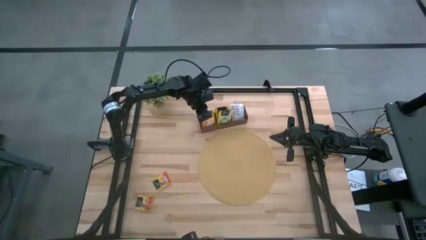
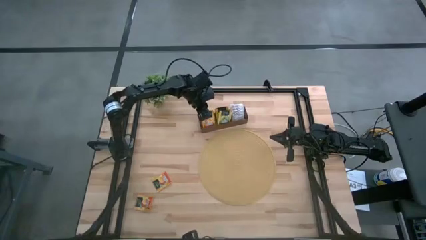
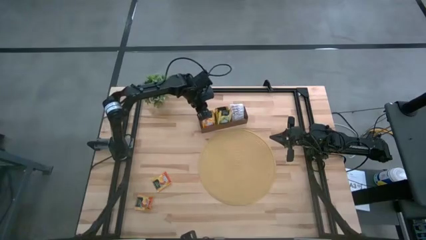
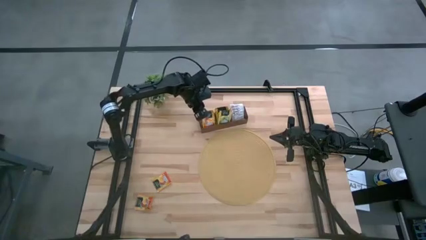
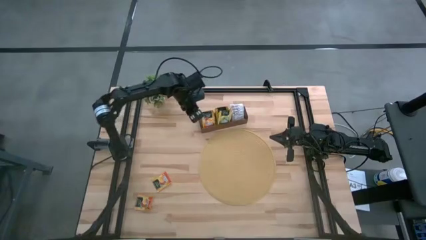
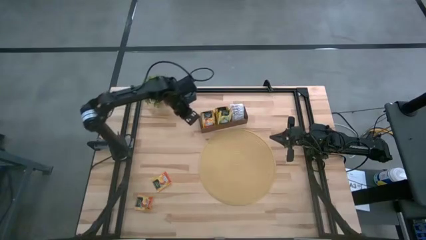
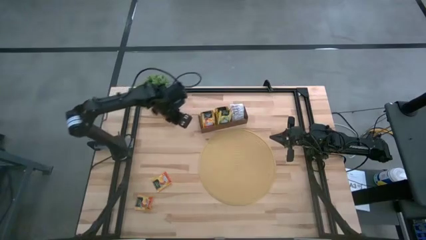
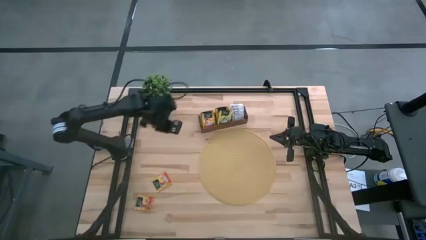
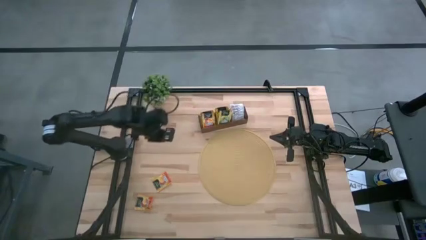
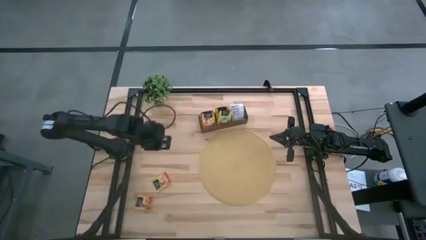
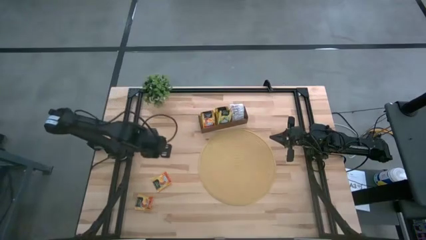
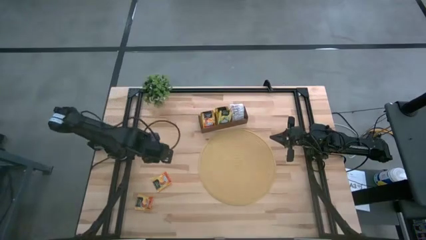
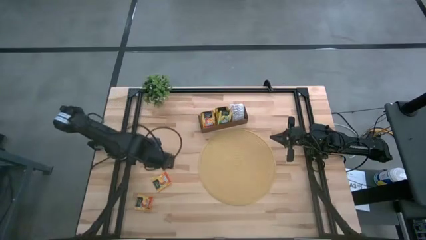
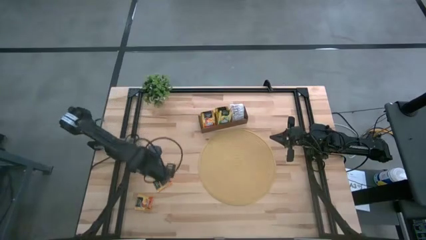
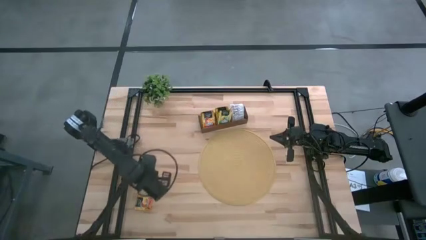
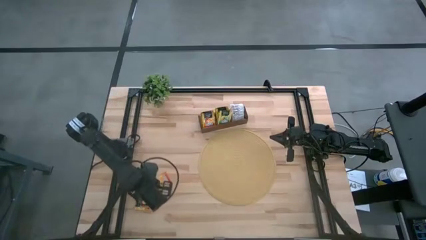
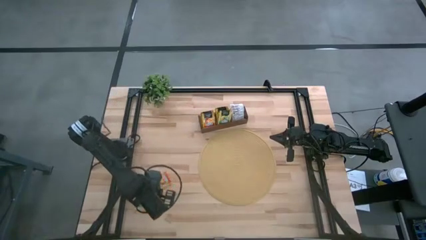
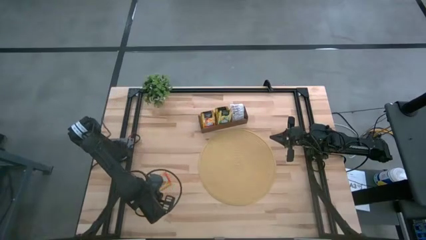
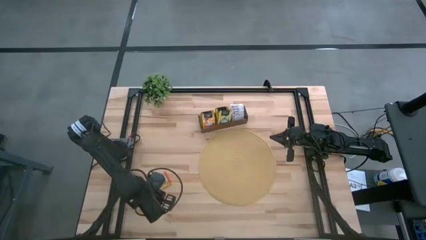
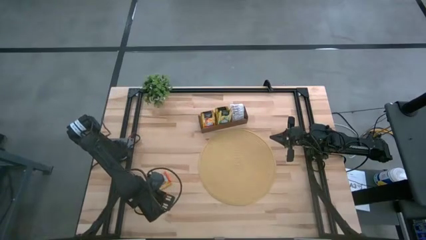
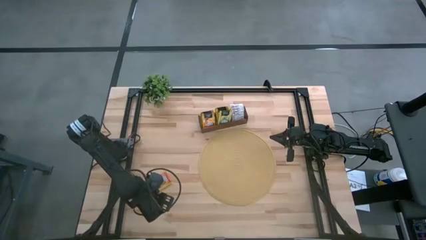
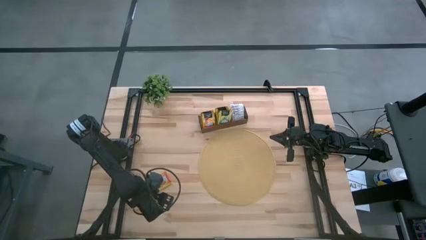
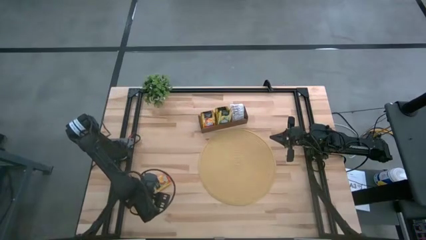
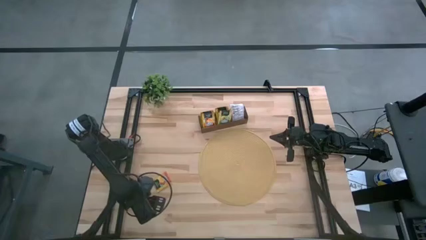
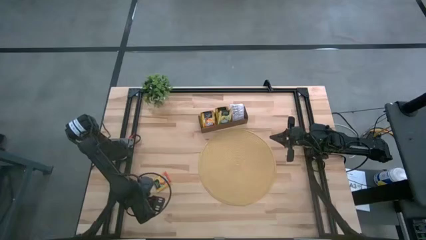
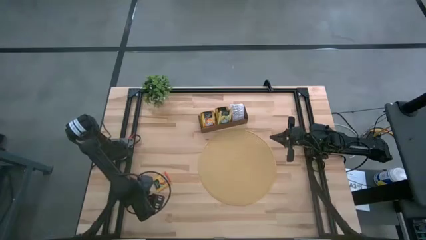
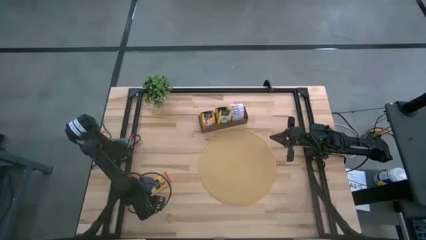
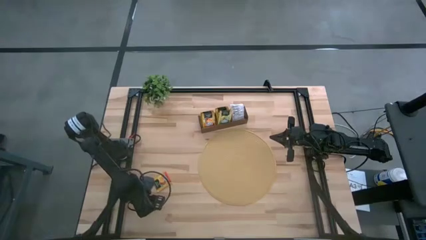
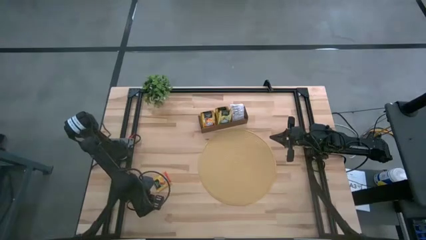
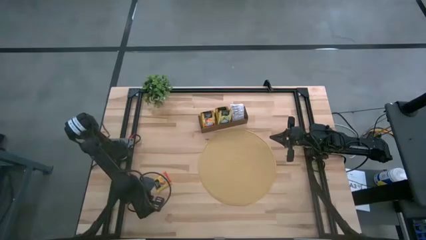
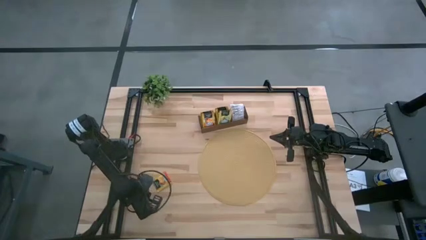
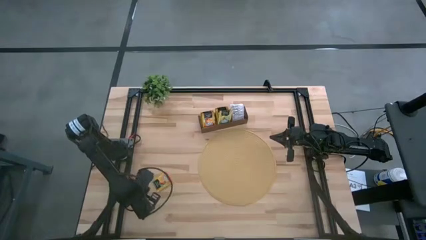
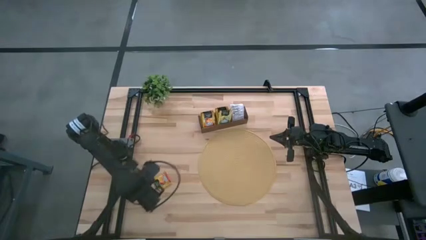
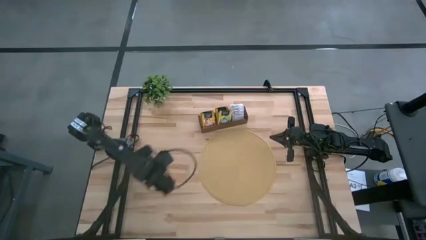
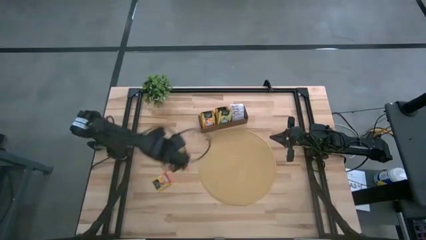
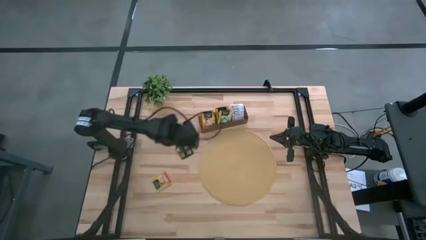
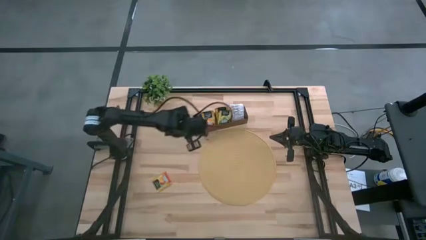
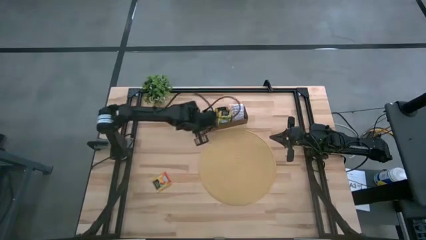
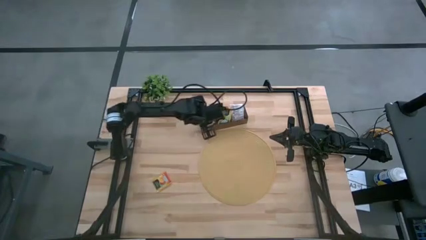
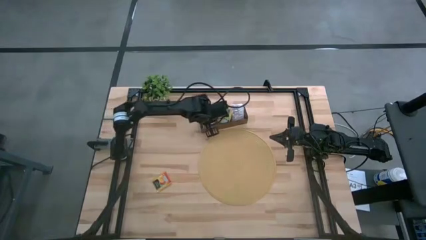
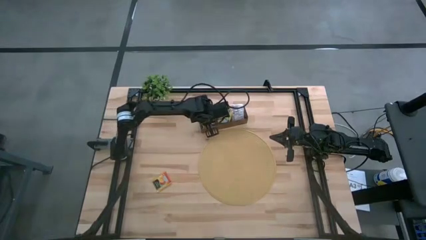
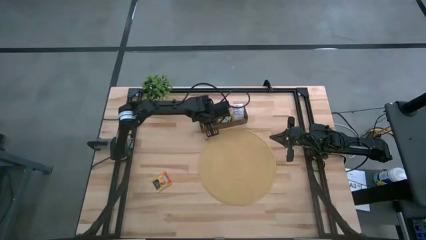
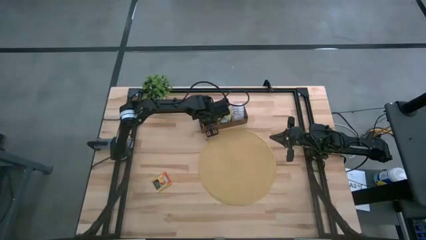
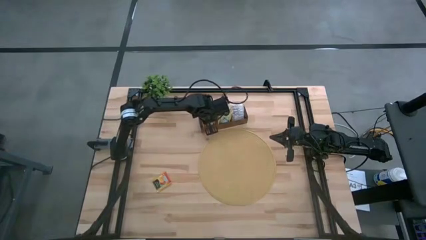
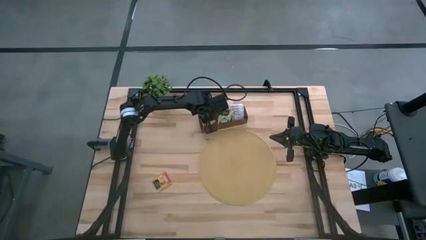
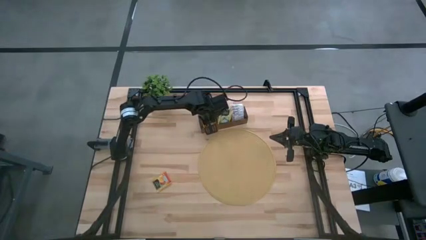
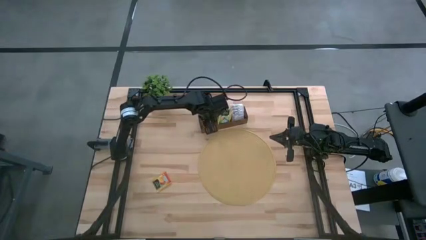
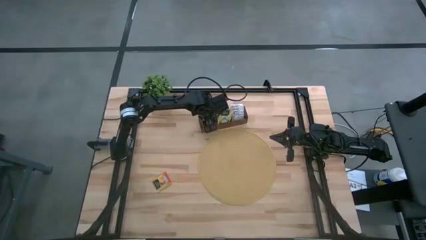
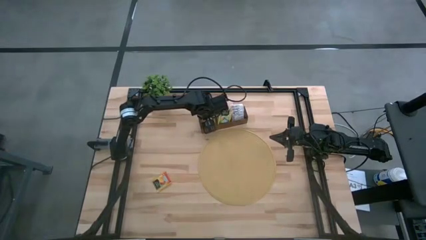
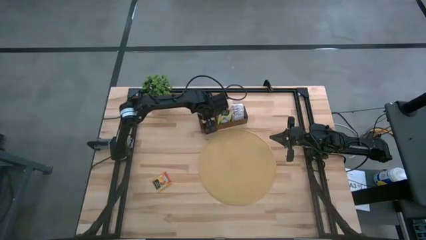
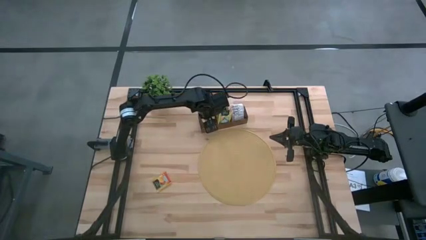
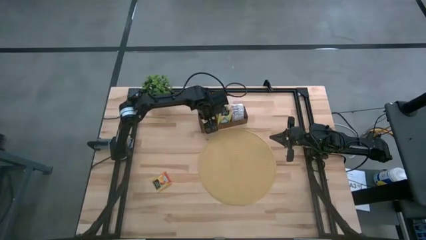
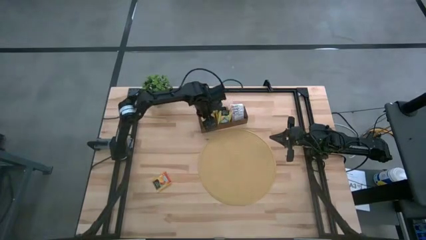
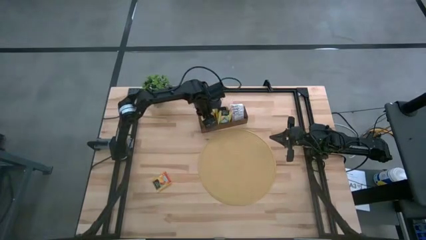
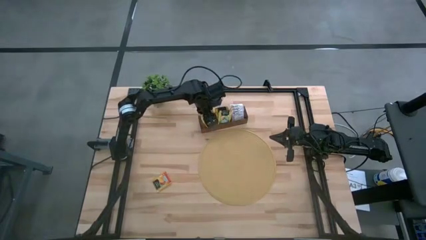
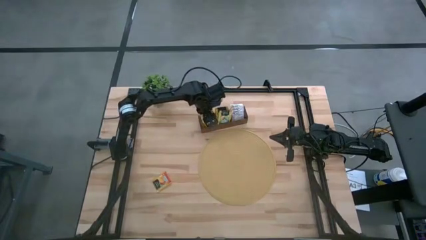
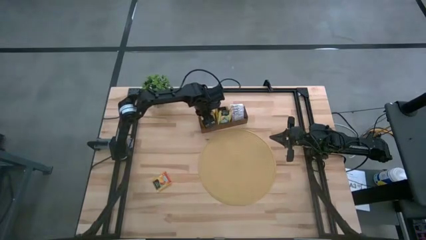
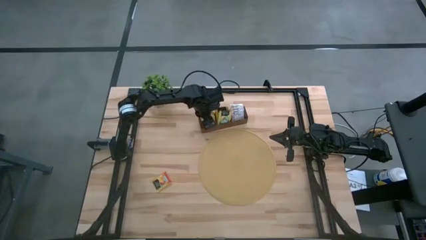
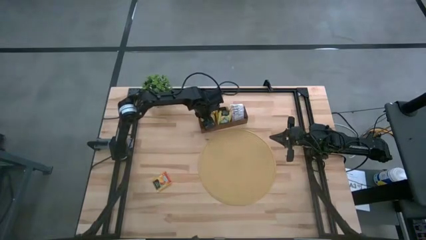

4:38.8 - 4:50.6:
Task: Pick & Place Tea
Put the orange tea bag into the left section of the wooden organizer

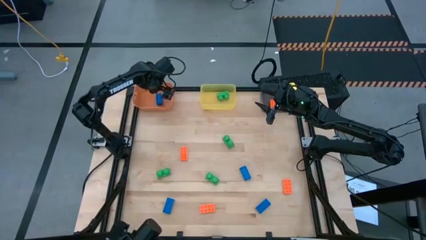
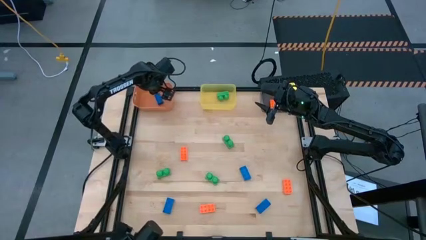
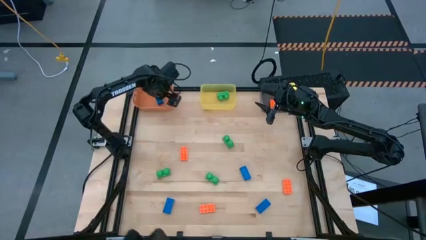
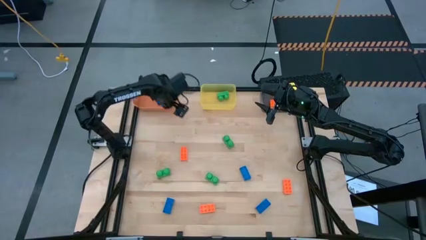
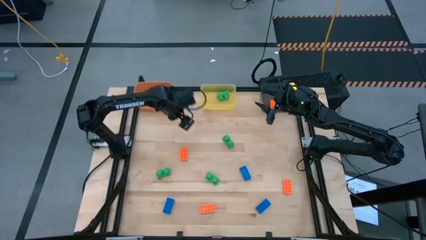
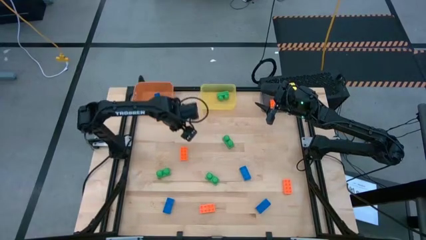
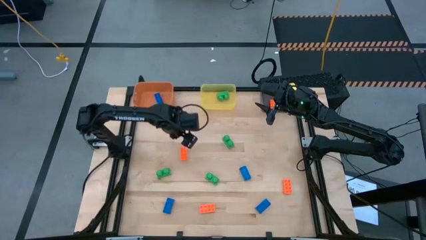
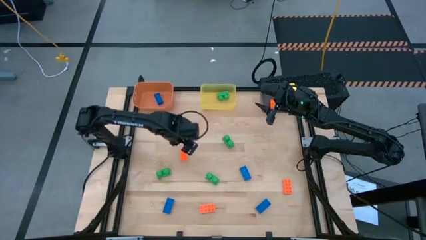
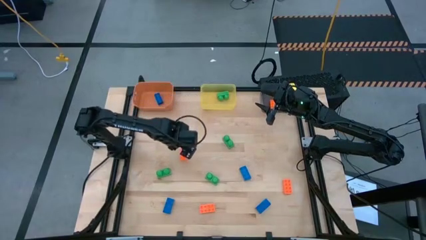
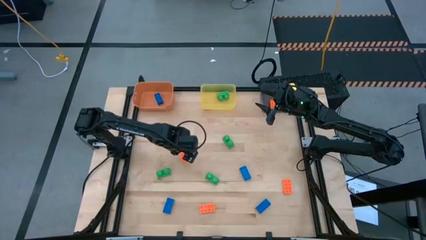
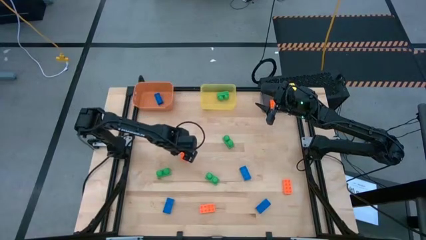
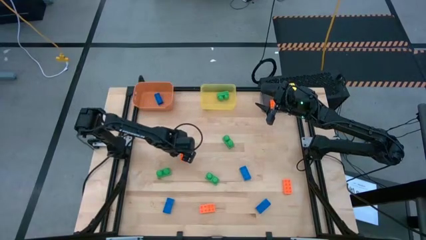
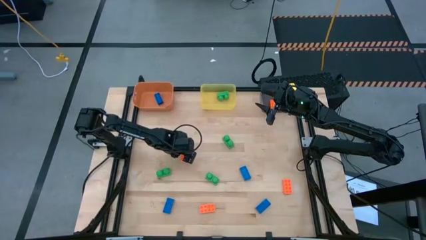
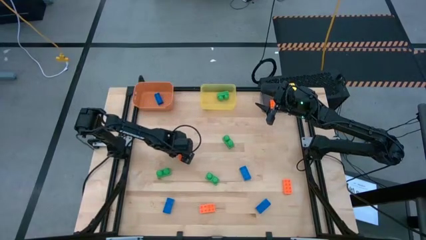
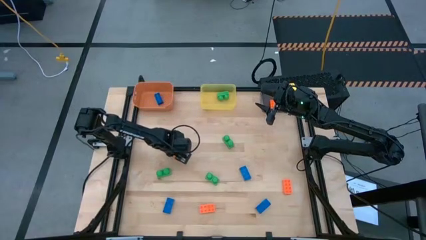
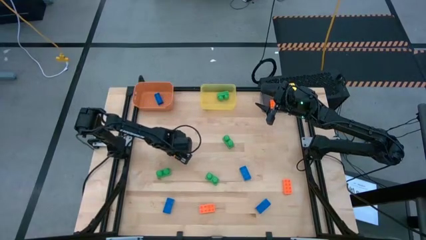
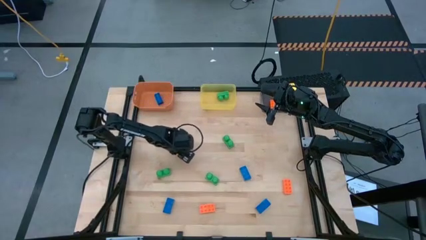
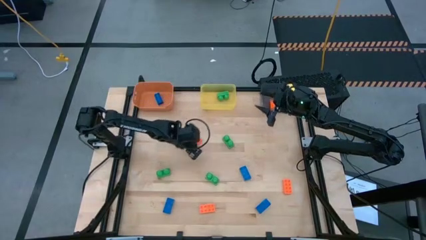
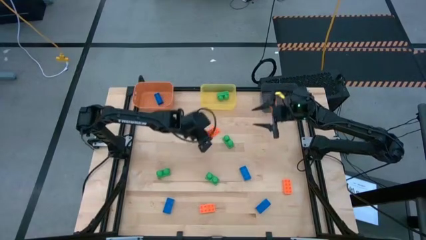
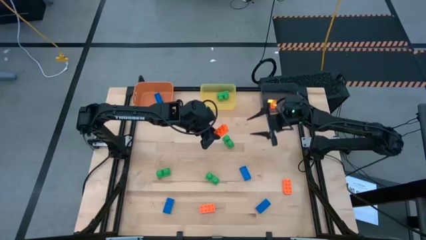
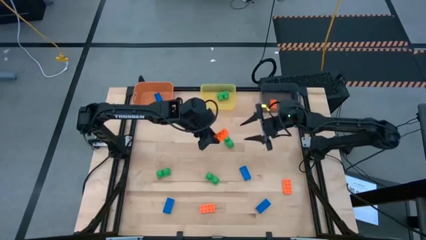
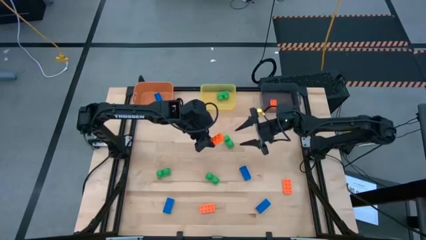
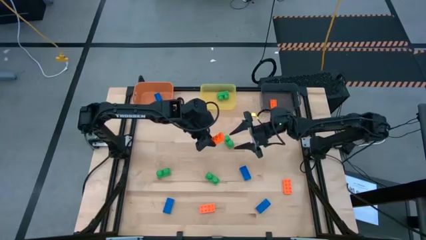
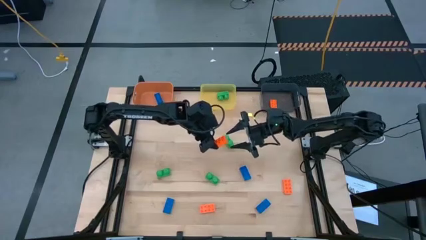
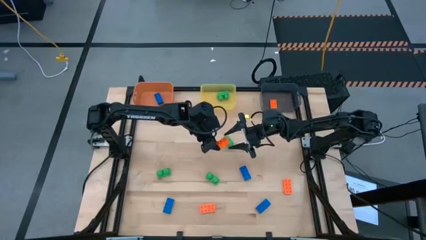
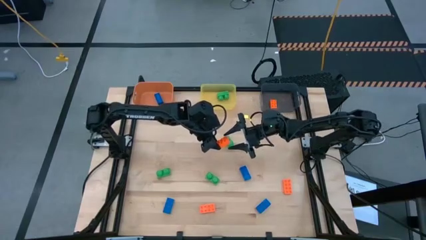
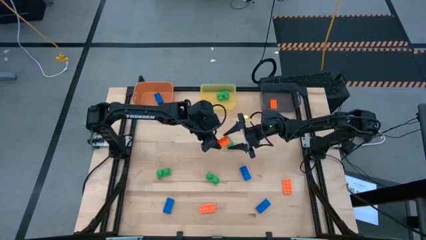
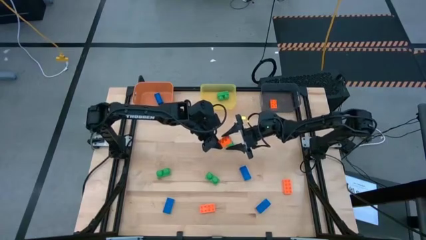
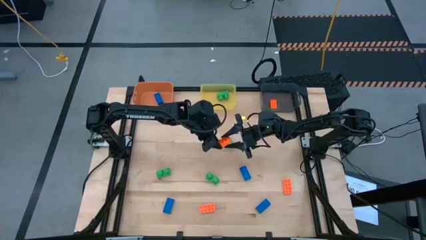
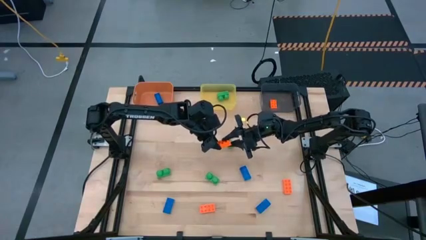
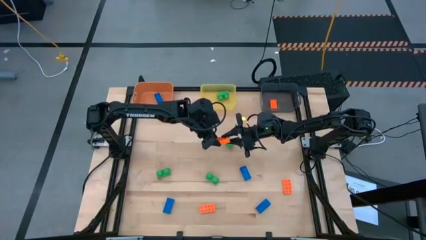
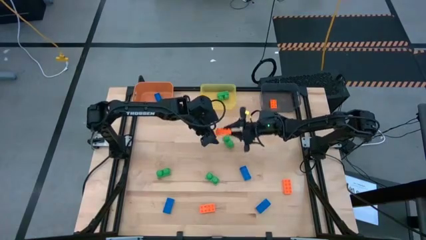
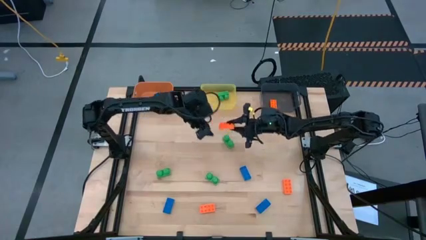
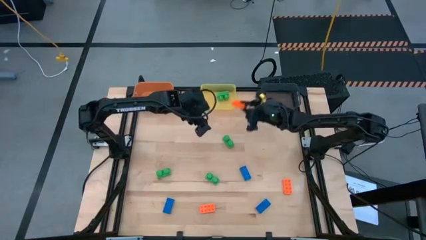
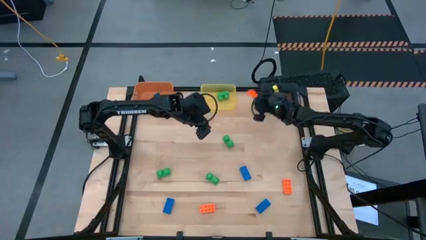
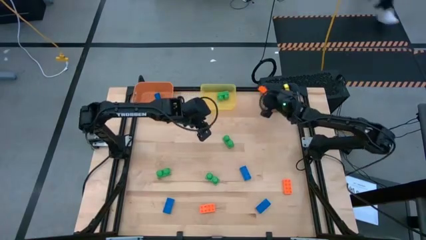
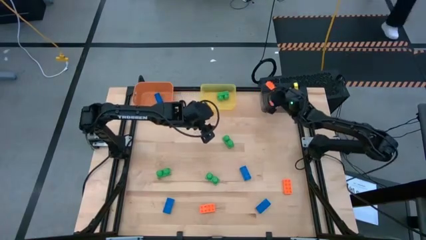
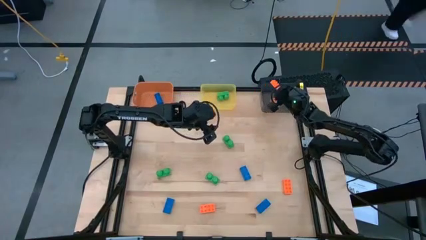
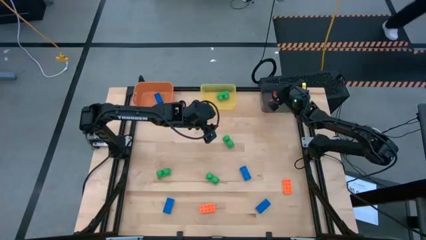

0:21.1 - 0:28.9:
Task: Sort & place blocks by color
Put the orange game piece into the black bin
